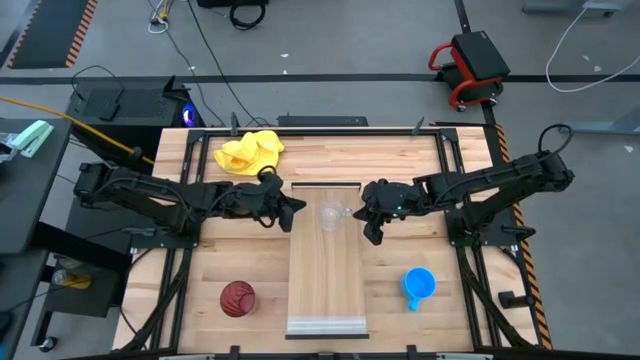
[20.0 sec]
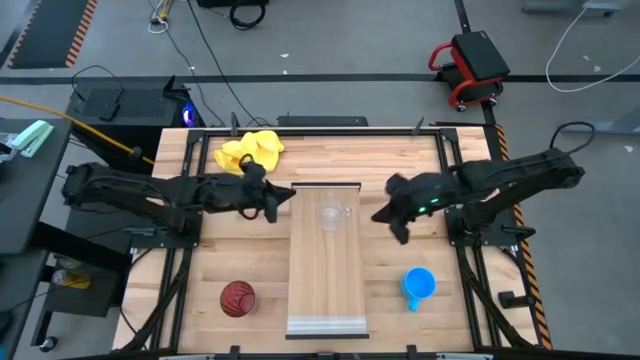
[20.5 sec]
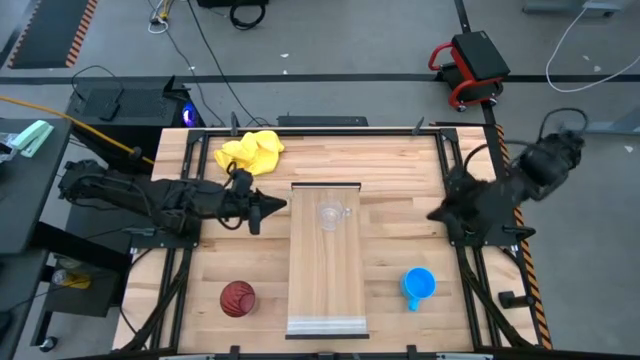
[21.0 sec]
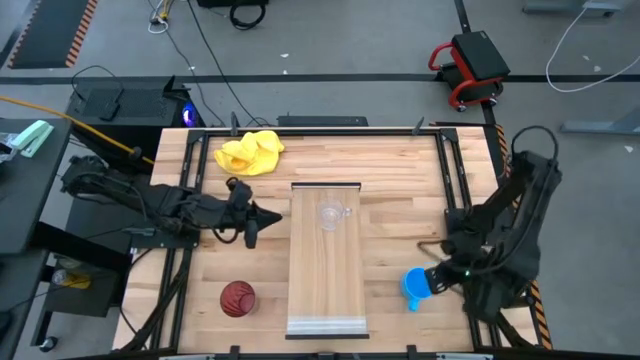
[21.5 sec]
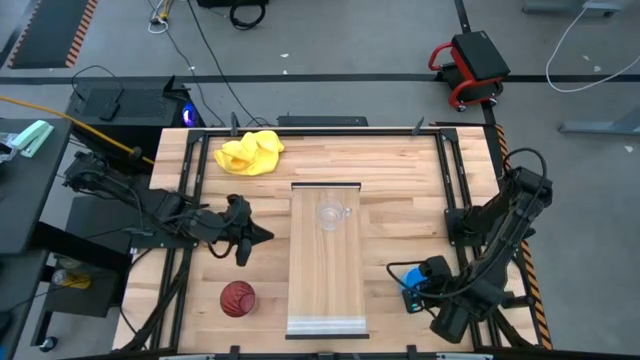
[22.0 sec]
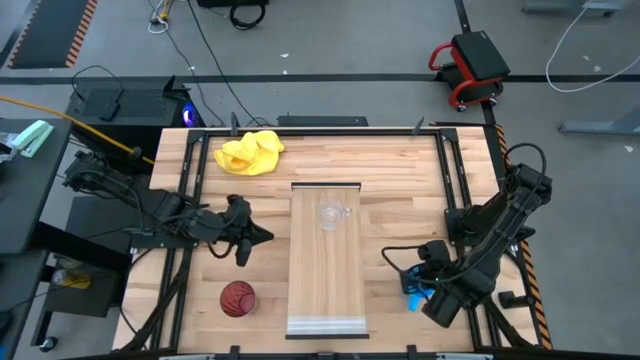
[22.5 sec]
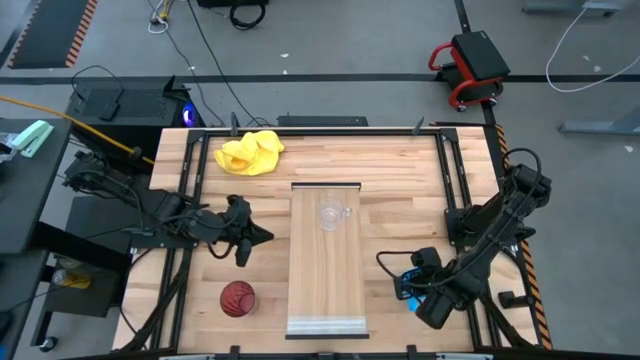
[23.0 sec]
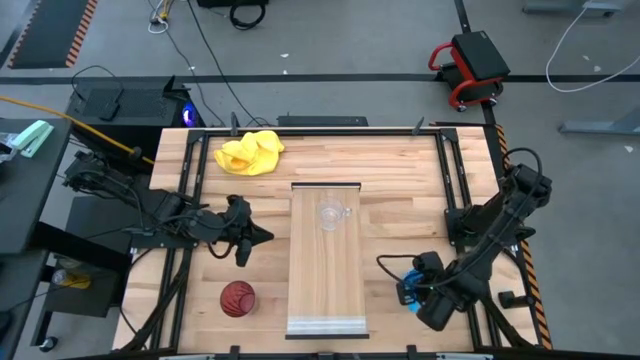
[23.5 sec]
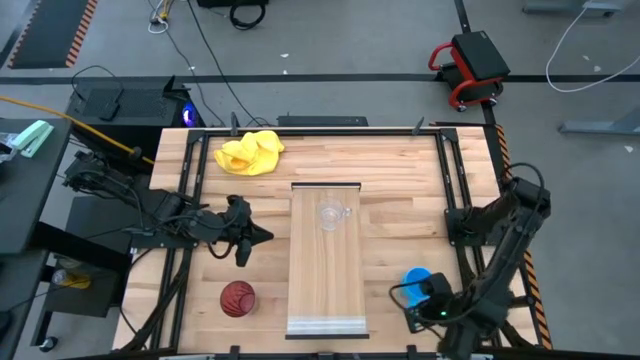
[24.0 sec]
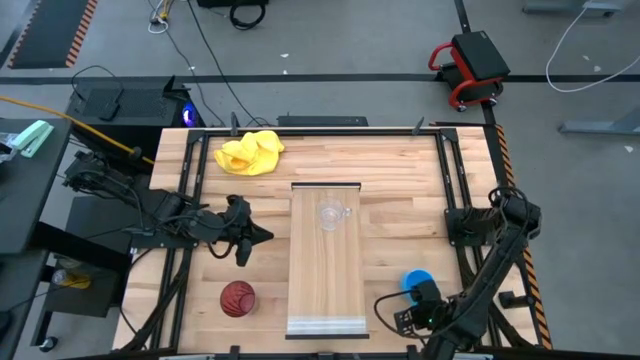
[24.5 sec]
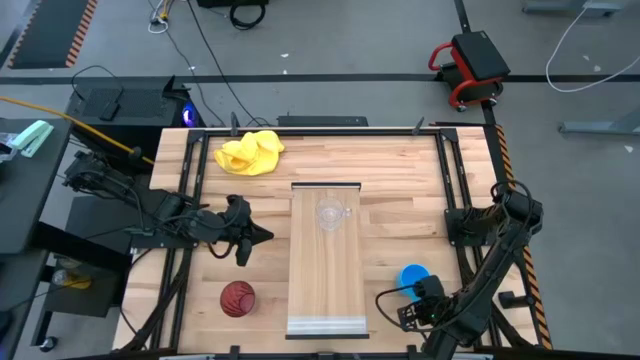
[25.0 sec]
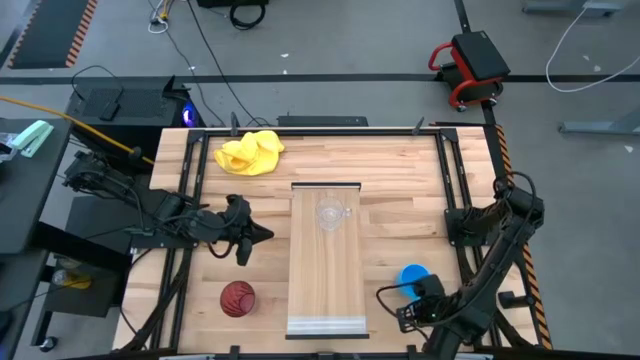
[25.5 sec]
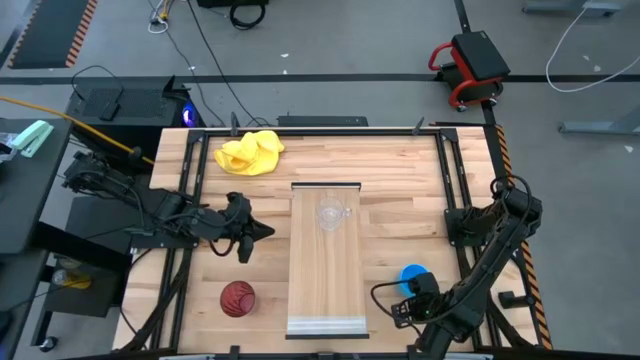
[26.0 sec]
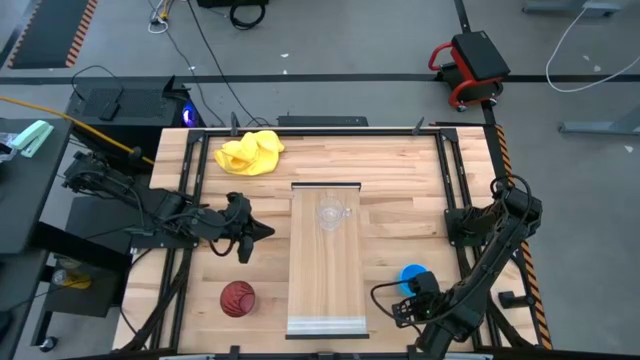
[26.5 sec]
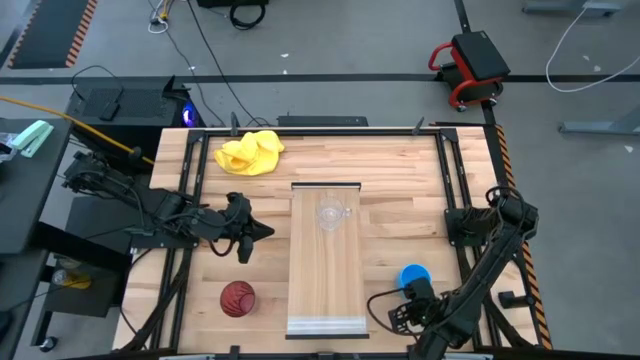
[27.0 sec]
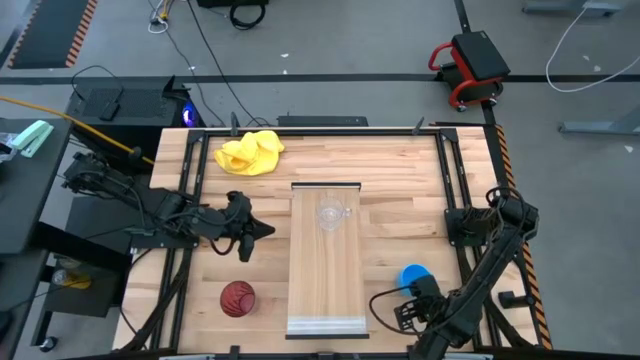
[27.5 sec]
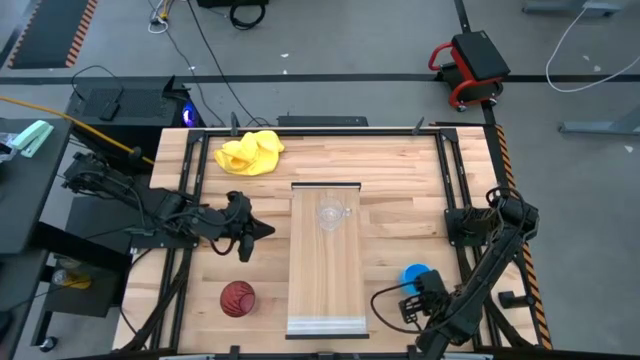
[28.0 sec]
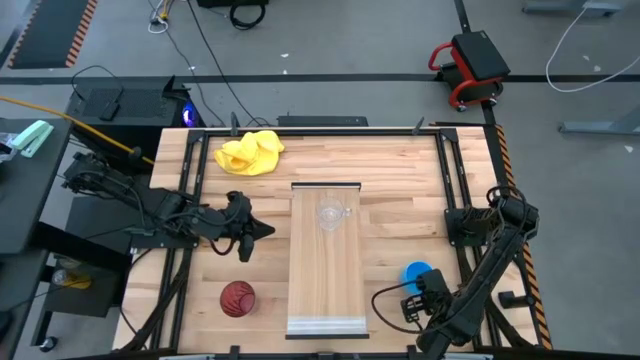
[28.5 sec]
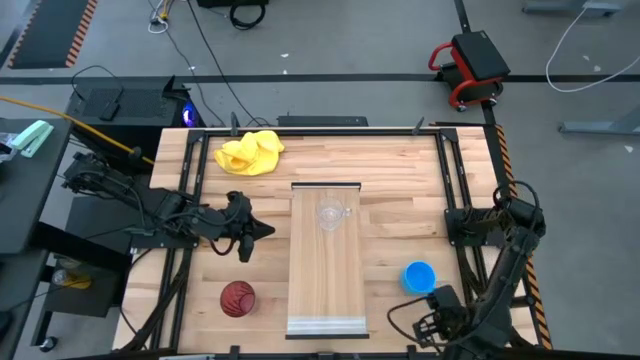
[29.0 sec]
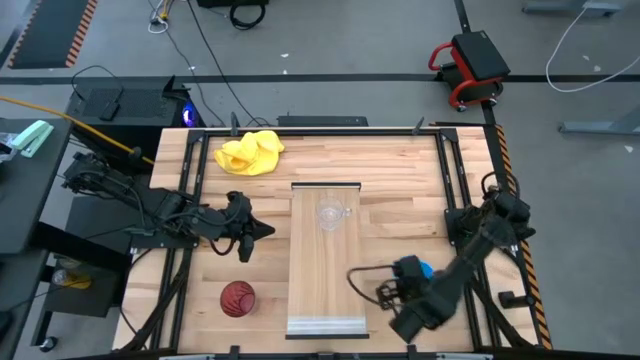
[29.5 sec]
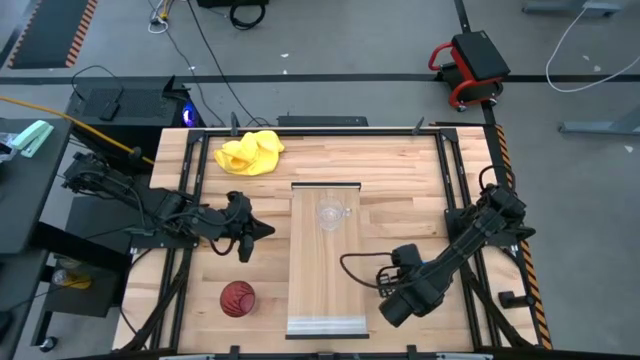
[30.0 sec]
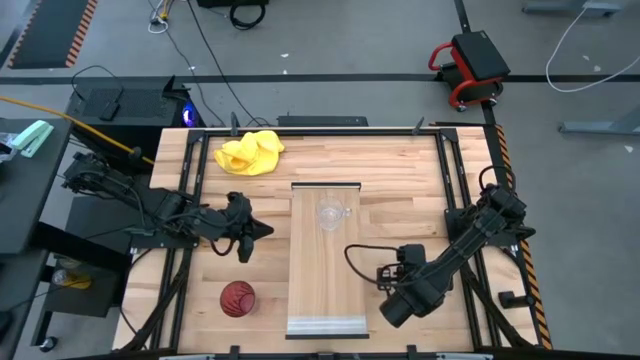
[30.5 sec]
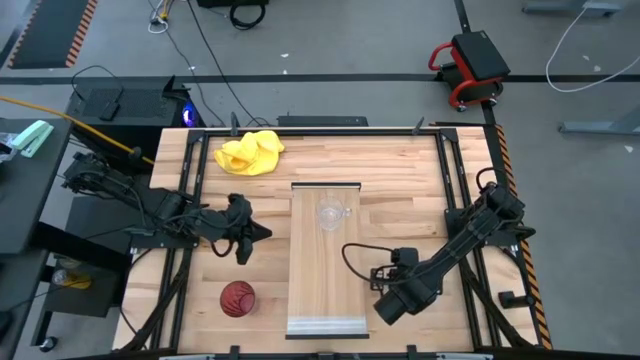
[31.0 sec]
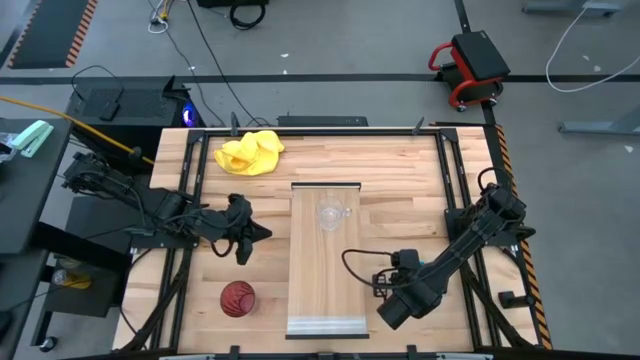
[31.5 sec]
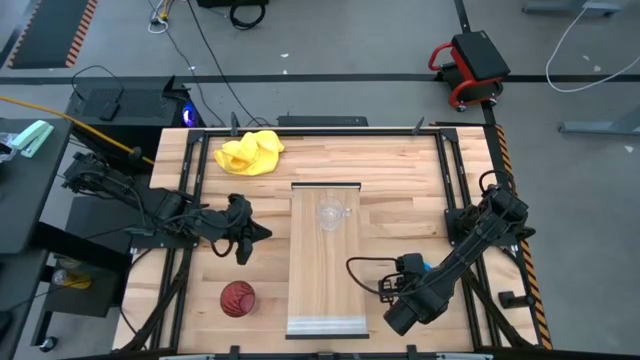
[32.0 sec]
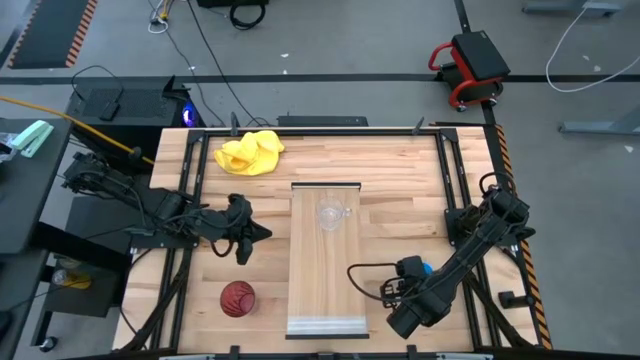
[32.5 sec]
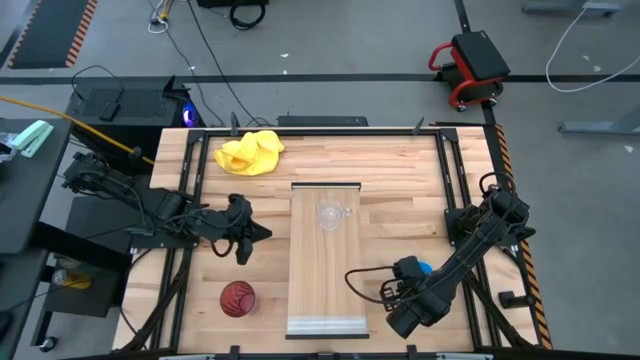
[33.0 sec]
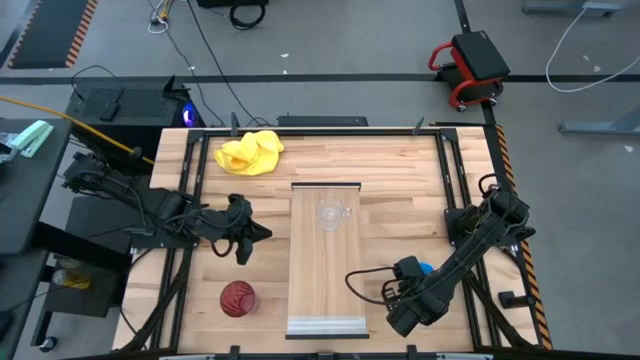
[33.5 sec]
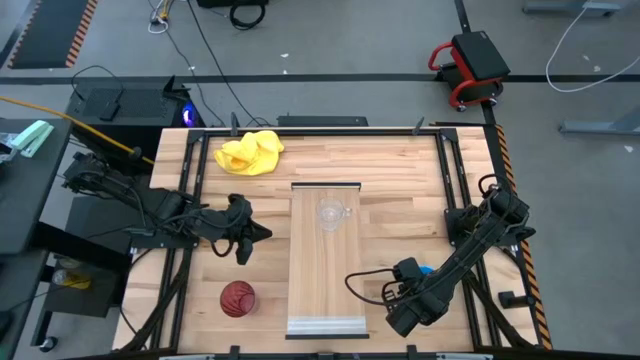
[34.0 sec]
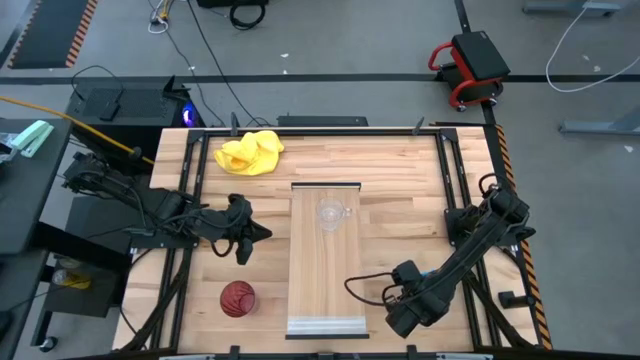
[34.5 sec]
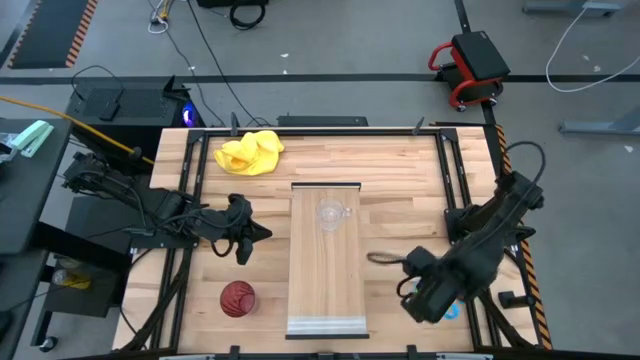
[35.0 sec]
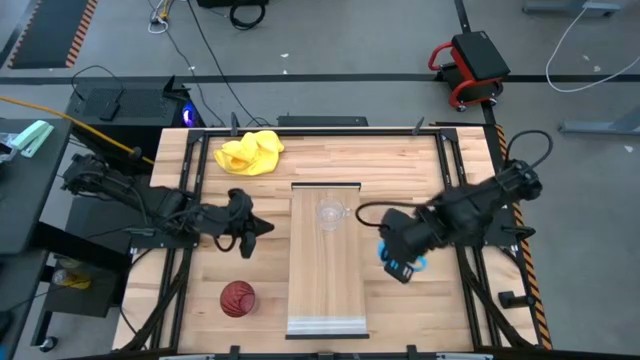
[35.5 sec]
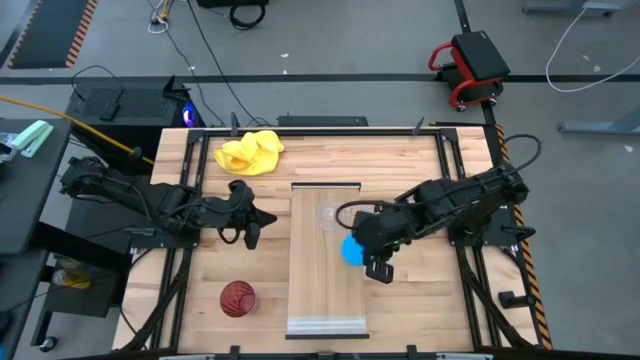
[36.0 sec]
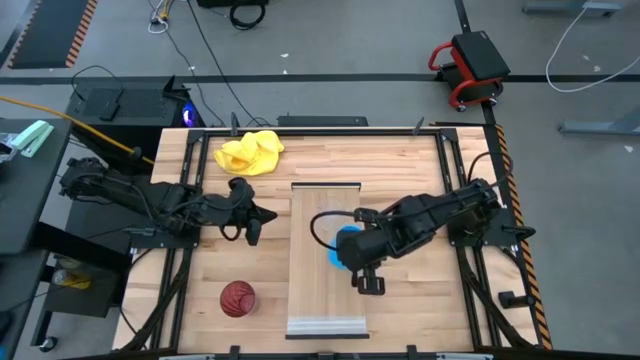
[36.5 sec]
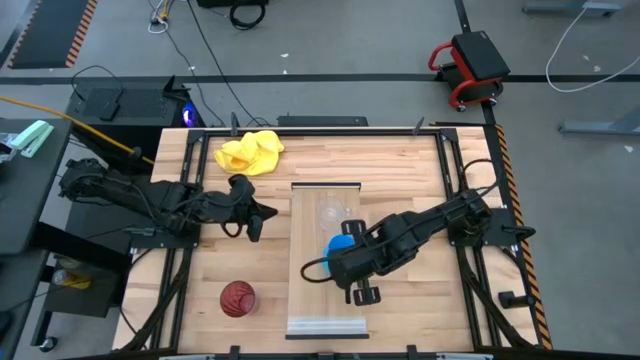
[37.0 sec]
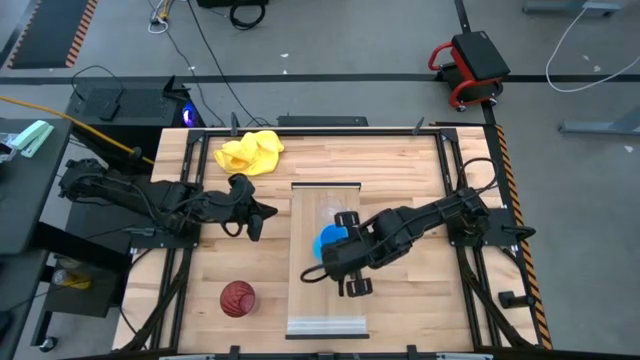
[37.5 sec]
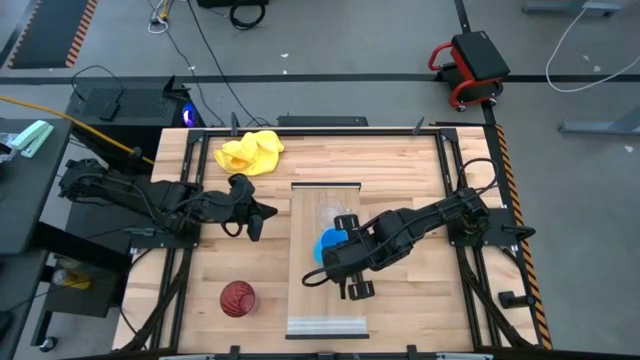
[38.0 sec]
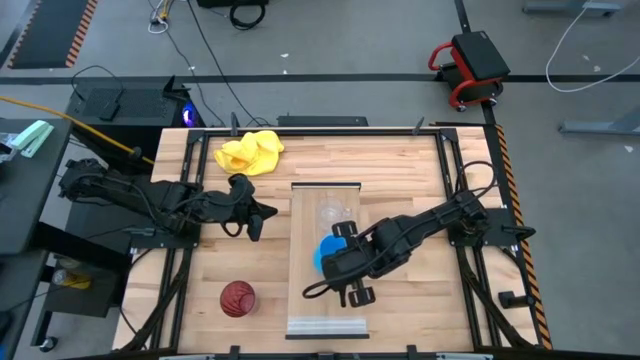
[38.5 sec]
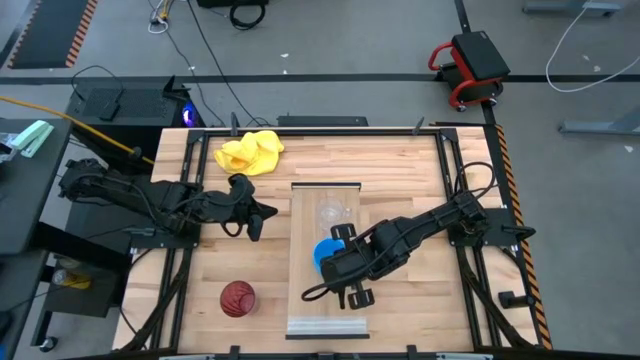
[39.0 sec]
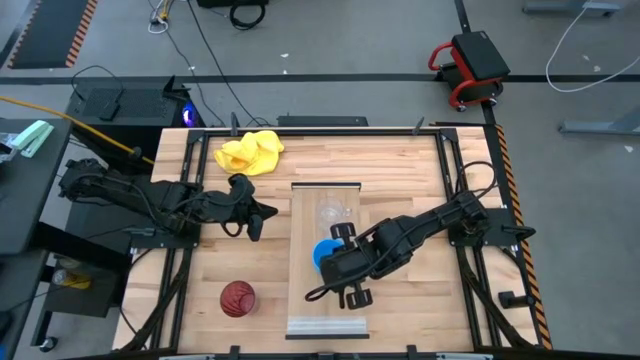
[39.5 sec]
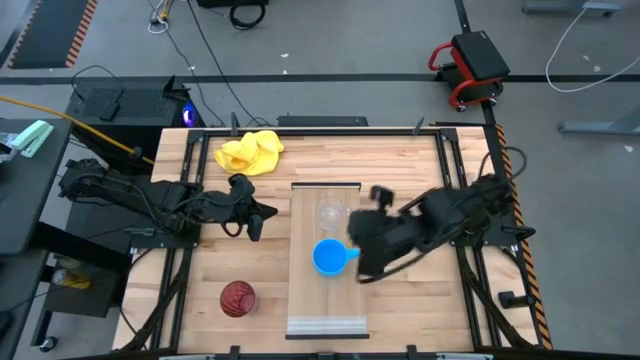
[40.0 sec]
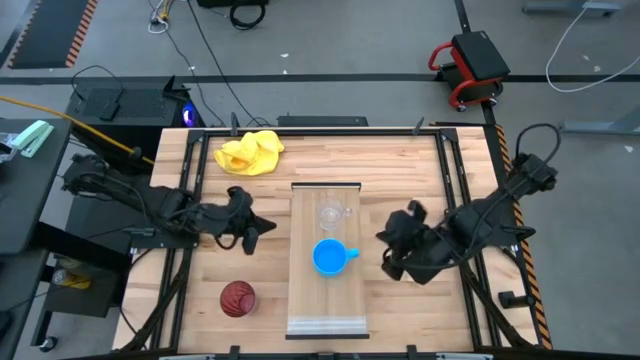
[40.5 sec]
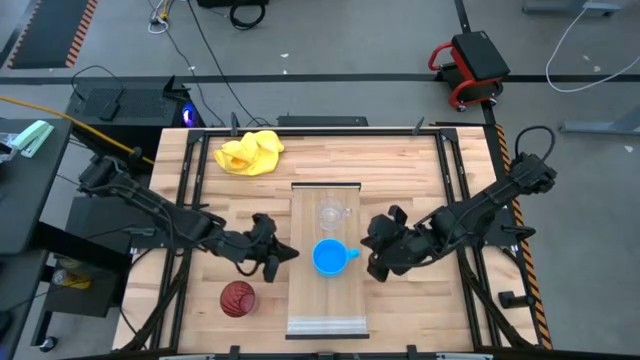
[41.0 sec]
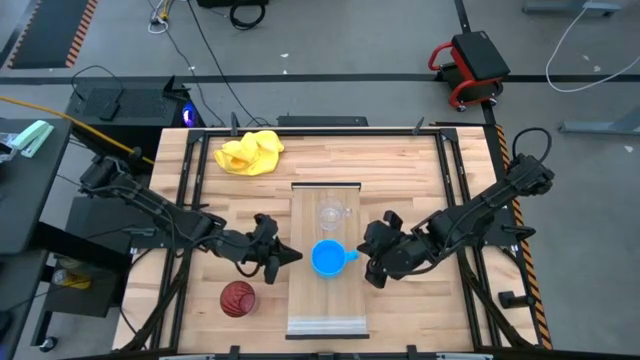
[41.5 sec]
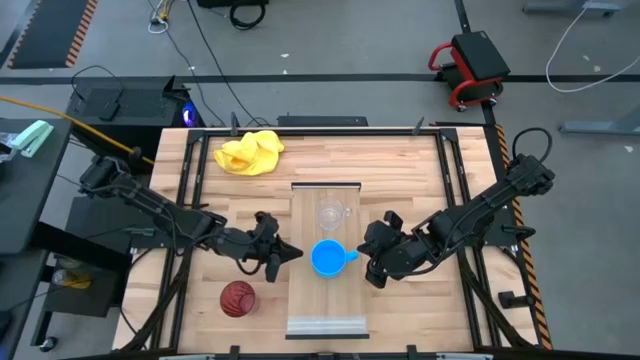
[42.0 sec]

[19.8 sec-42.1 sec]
Task: Stack small to large cups/mugs on shelf
Put the blue mug on the shelf
